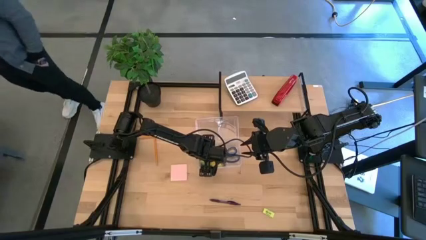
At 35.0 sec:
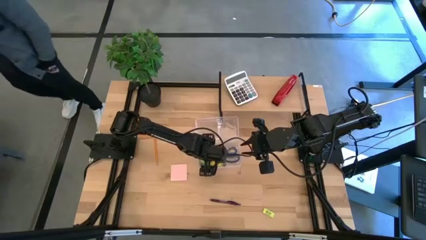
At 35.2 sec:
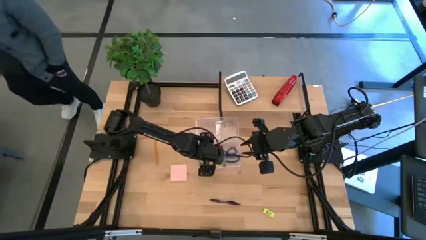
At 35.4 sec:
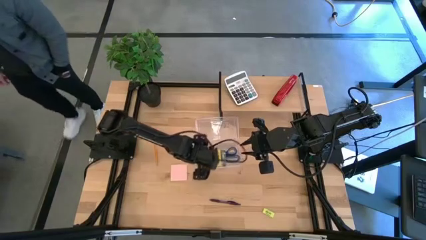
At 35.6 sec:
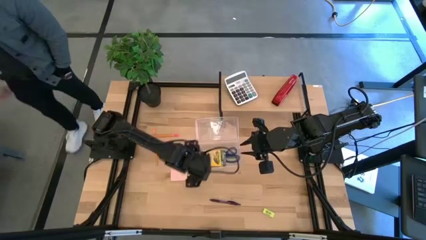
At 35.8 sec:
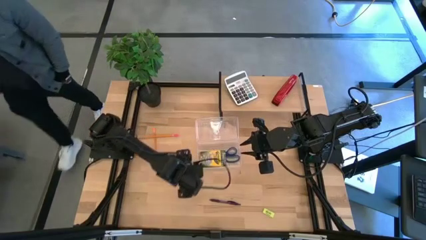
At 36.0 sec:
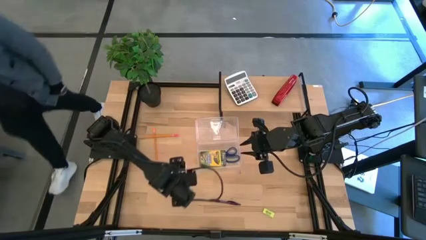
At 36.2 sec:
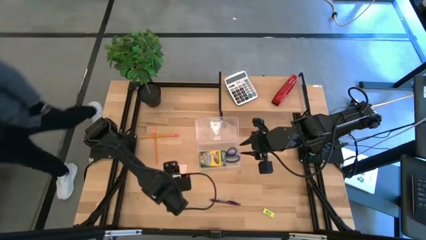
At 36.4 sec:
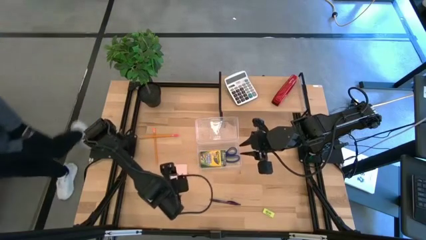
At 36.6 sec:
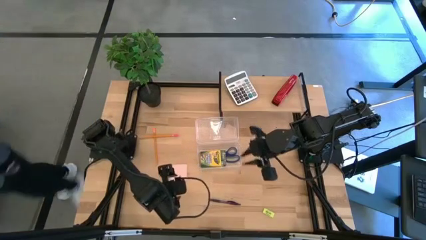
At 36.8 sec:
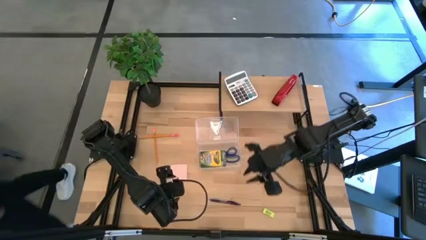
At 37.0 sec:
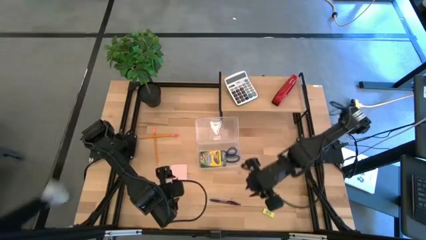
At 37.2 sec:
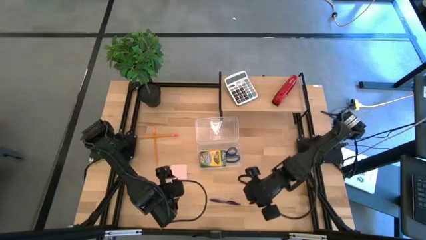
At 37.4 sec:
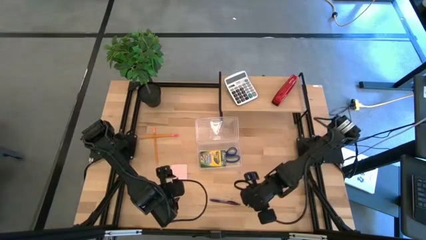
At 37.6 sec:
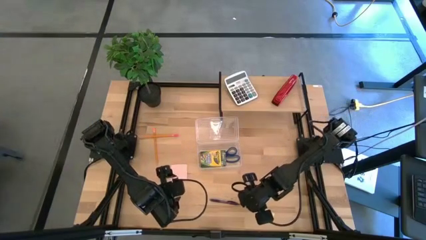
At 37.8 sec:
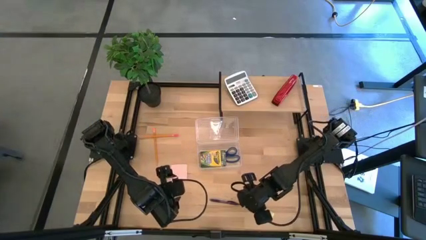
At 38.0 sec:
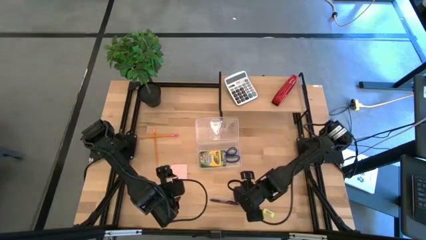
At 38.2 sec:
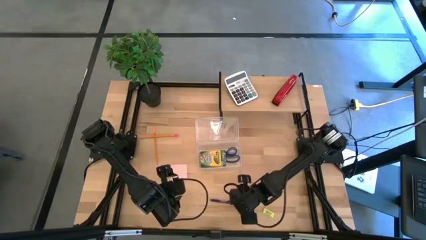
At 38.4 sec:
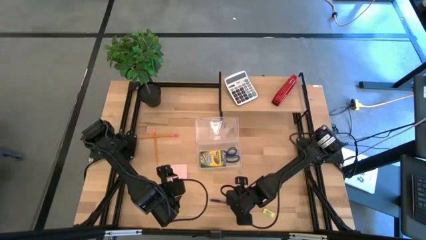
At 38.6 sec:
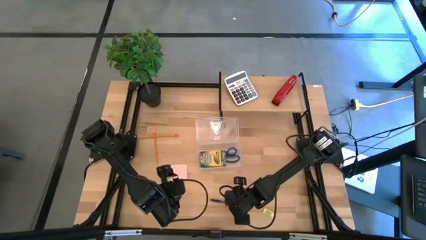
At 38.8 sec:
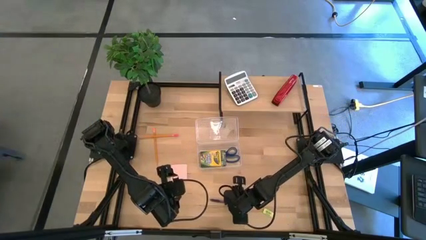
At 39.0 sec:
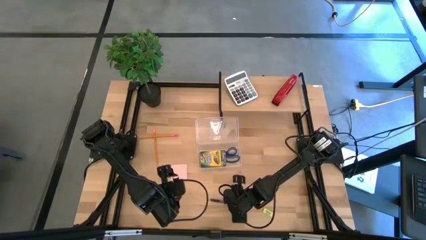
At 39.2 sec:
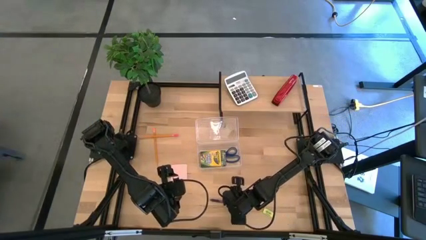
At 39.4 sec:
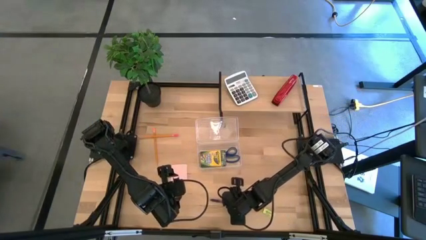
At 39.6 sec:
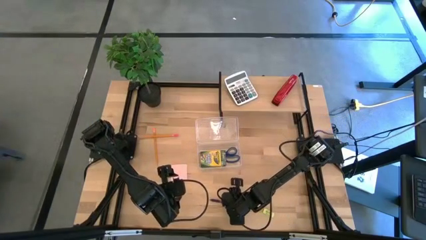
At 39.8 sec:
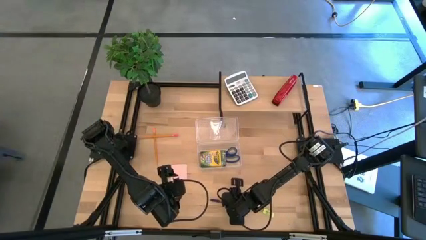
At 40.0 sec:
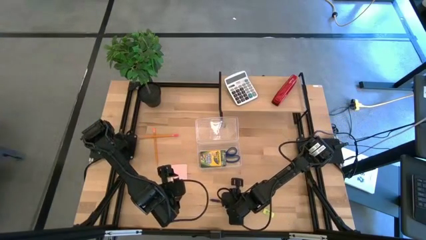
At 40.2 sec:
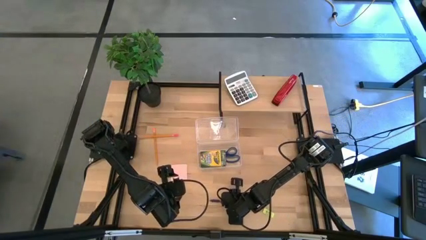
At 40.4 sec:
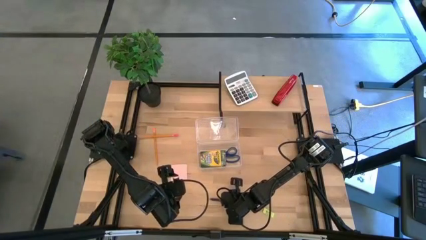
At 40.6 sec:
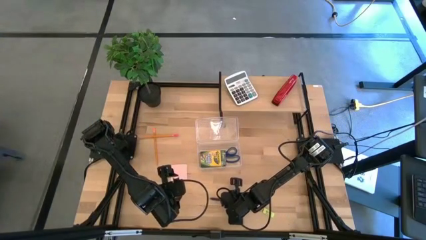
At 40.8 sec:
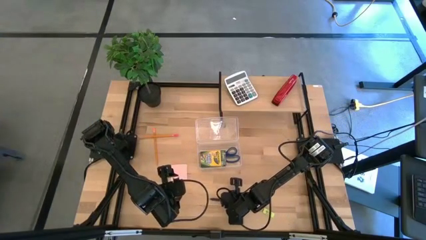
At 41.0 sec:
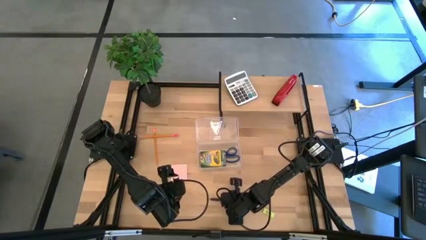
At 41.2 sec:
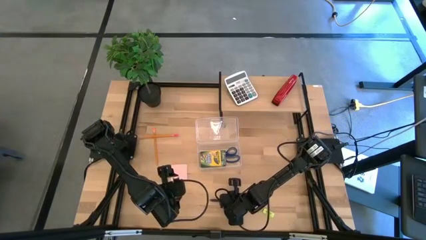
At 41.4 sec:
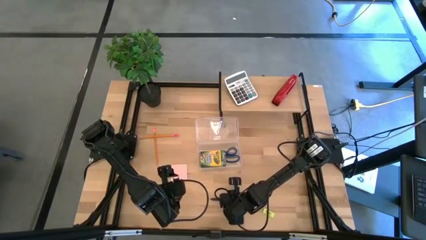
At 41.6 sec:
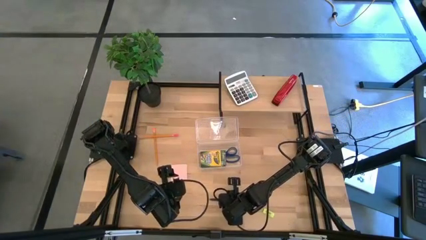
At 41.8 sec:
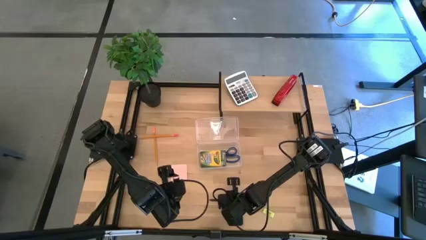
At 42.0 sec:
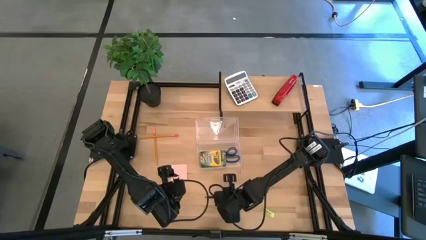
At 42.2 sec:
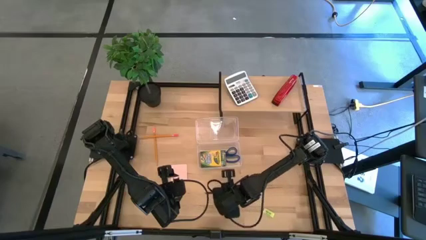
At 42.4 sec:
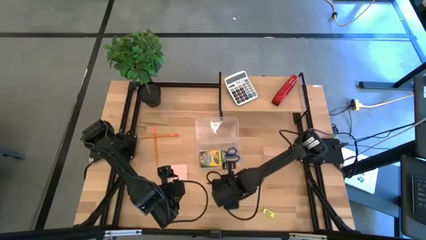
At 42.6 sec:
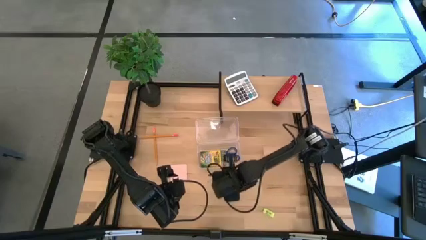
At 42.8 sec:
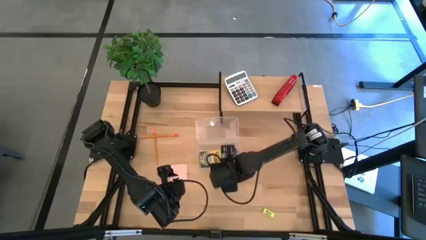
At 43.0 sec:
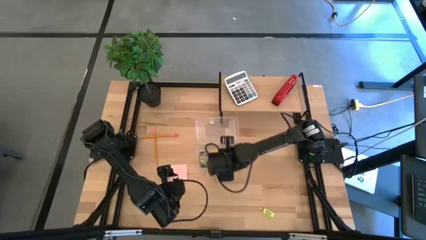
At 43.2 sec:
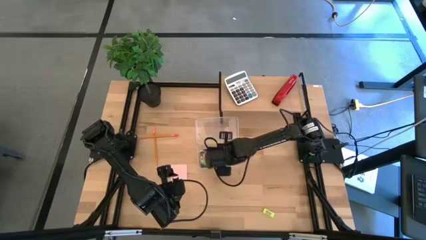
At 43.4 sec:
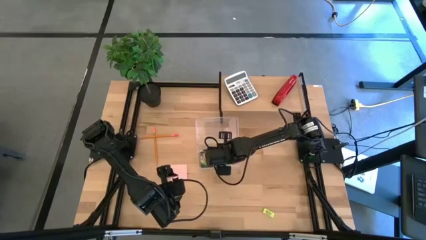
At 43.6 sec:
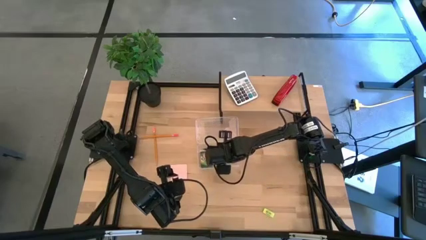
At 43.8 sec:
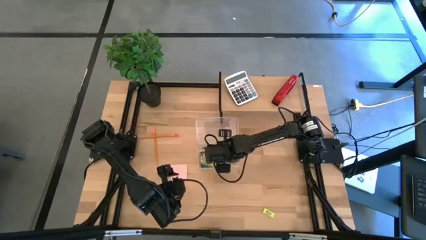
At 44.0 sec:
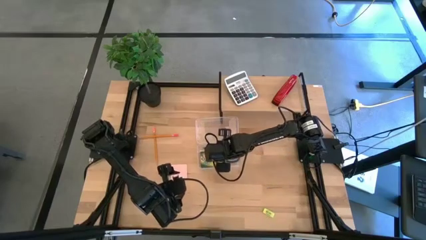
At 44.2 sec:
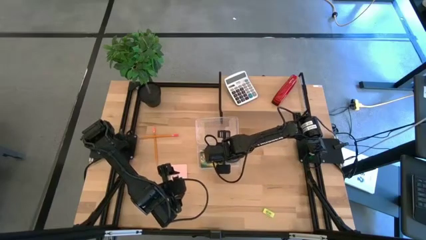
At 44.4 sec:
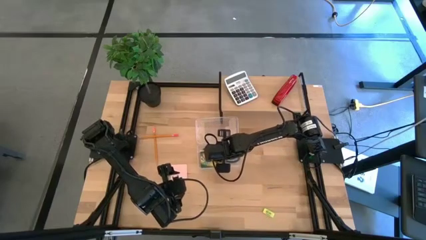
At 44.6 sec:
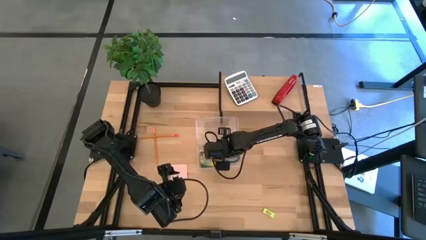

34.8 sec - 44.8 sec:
Task: Pack school essentials
Put the blue pen into the transparent supply box

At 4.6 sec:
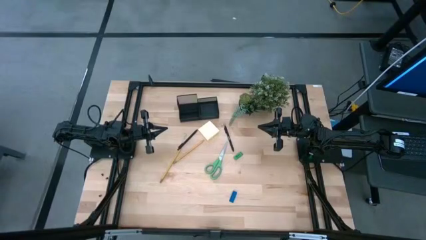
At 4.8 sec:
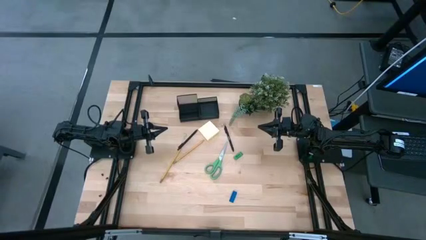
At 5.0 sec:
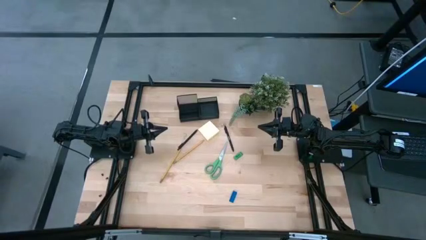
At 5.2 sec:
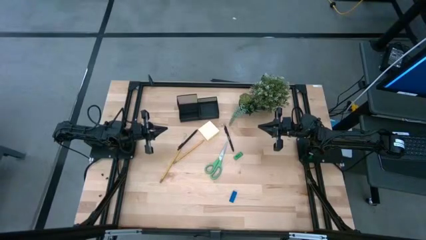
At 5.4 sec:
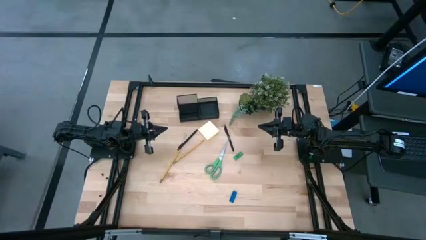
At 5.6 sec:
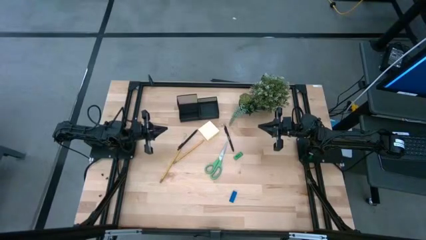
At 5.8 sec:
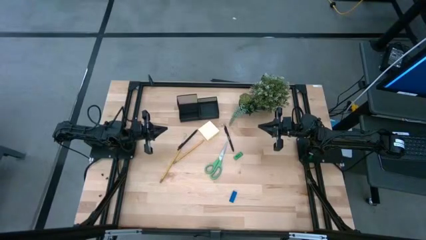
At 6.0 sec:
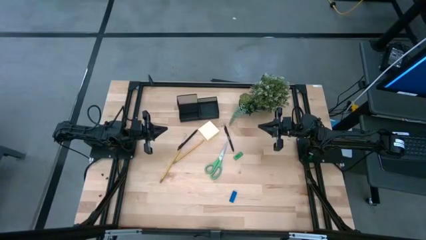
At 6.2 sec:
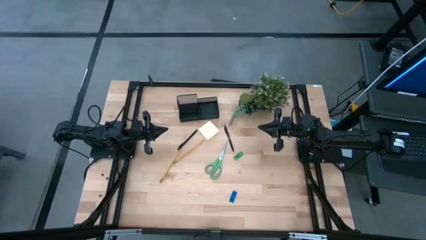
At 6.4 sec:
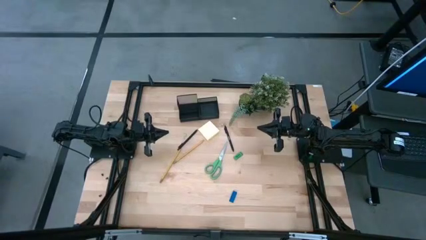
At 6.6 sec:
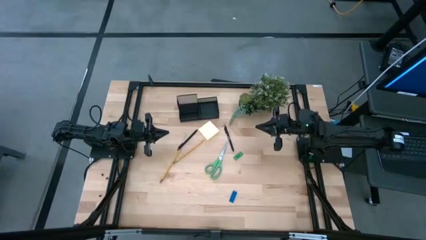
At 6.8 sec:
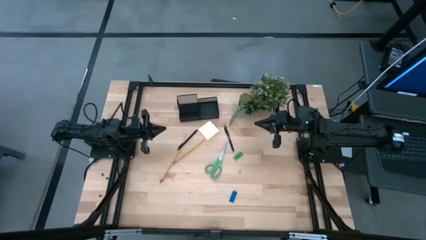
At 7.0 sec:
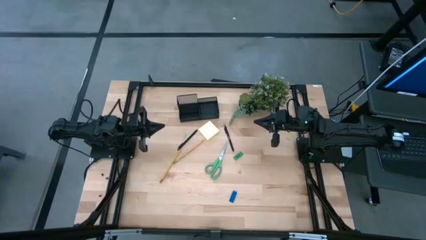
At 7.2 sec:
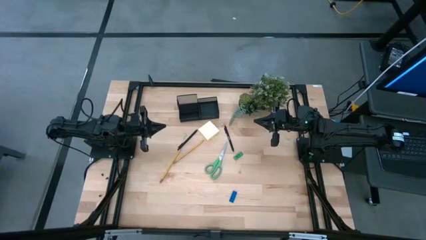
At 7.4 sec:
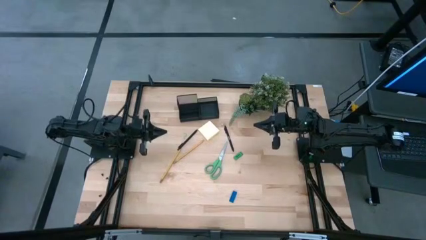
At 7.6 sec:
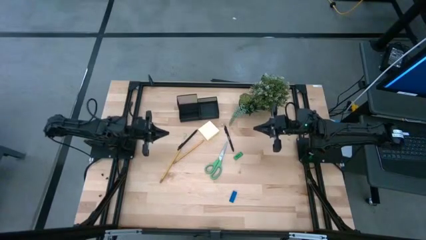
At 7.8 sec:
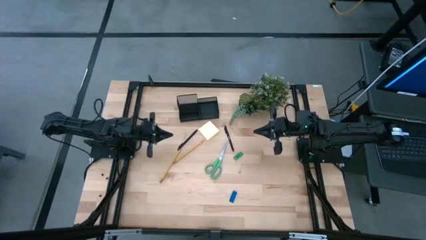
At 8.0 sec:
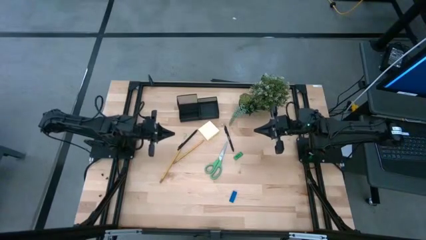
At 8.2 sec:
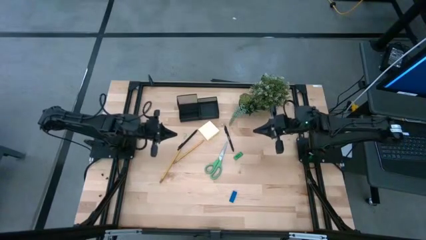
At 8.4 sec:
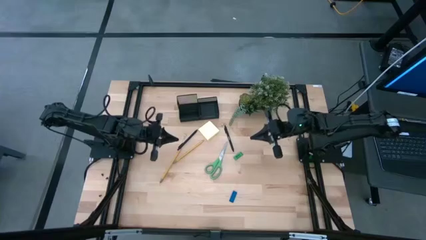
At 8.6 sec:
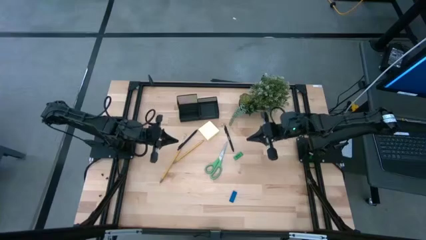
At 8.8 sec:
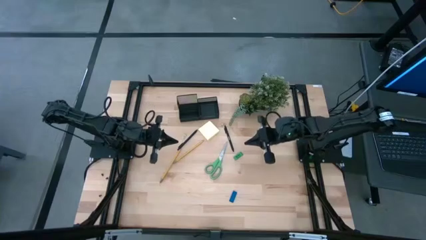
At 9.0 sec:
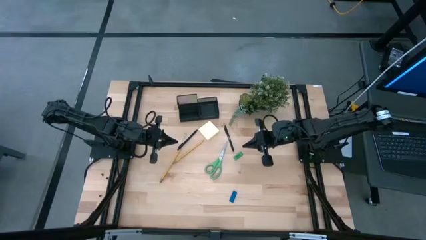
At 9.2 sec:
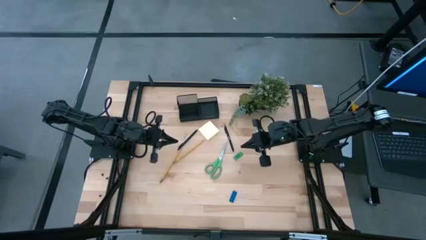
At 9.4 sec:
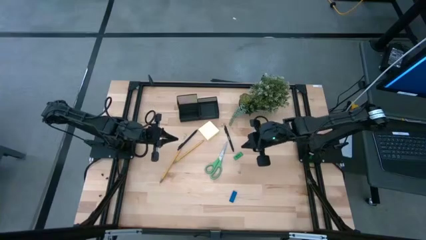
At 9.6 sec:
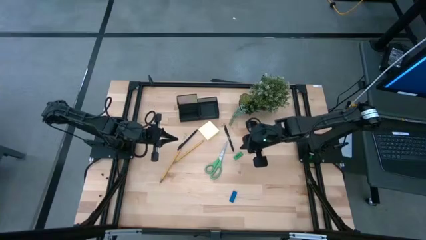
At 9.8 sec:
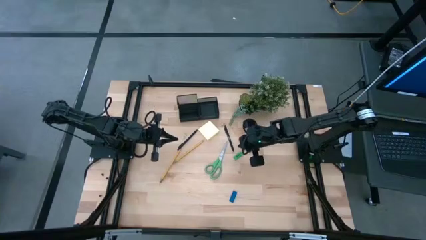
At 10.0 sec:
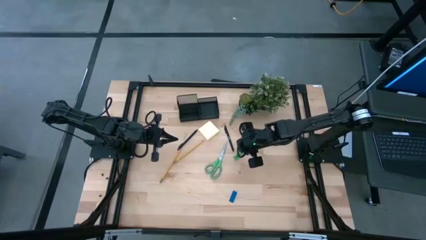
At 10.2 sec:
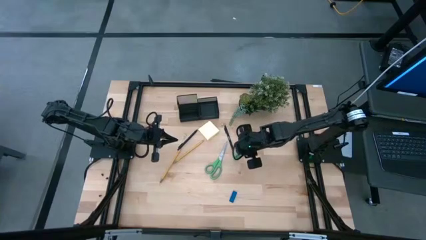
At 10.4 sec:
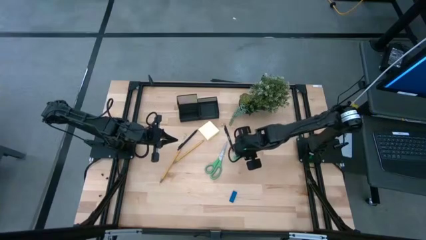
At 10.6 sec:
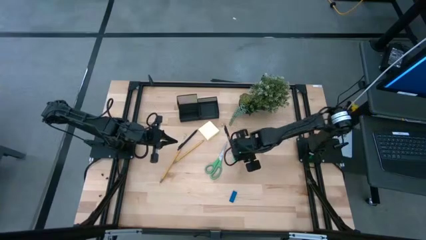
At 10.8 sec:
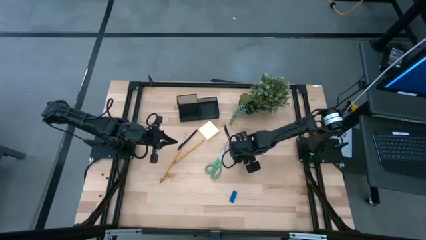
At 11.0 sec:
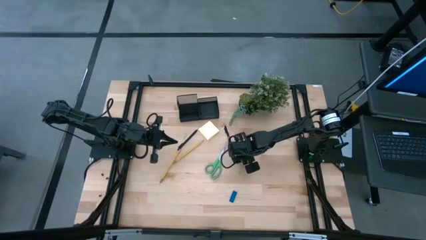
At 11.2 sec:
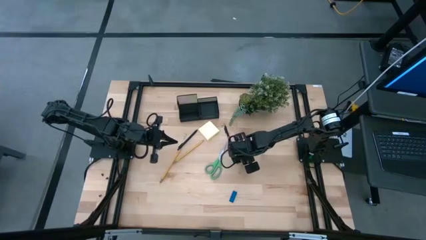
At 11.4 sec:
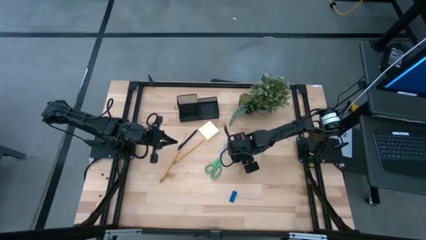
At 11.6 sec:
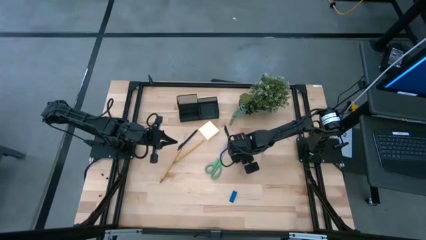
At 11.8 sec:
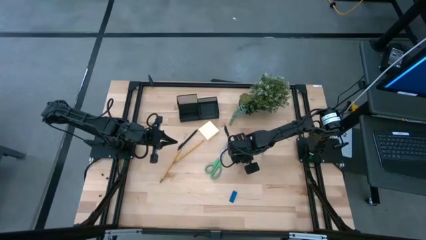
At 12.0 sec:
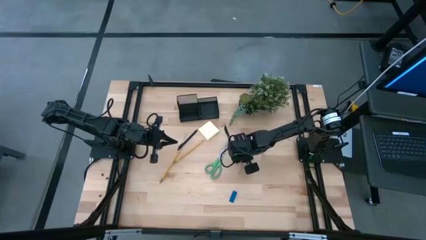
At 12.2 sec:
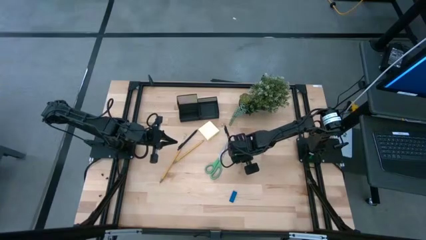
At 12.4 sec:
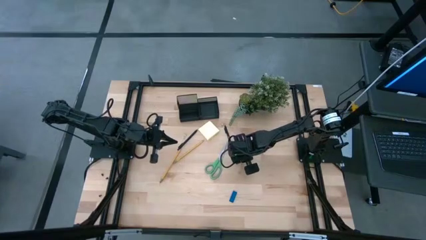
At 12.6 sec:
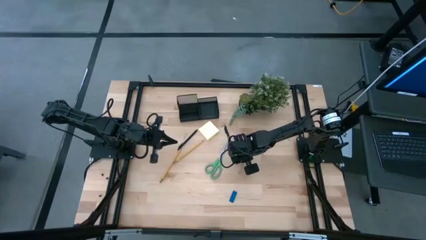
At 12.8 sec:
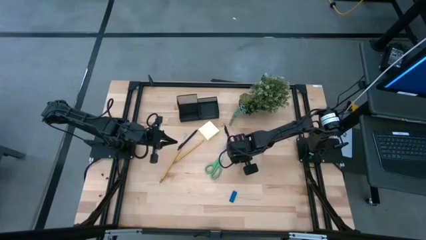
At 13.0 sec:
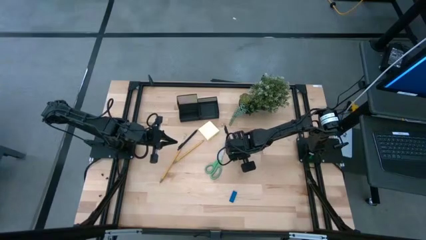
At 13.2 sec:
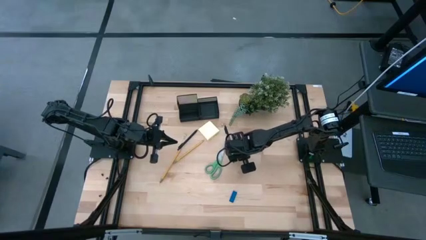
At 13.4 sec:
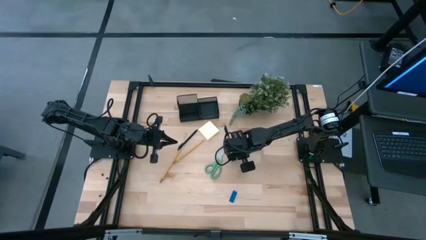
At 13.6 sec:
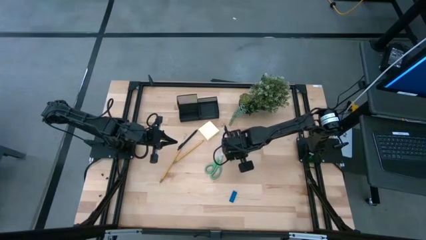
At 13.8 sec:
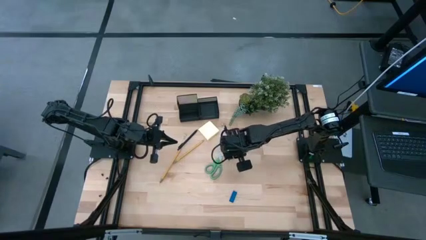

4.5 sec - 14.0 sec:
Task: Pick and place office supplies into organizer
Put the green eraser into the black desk organizer
